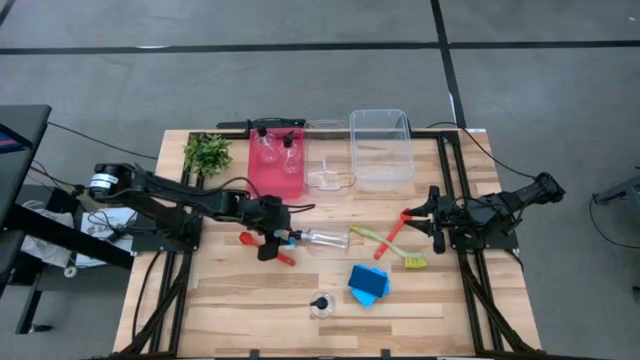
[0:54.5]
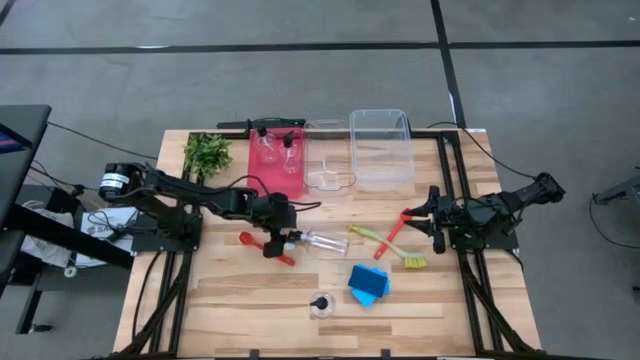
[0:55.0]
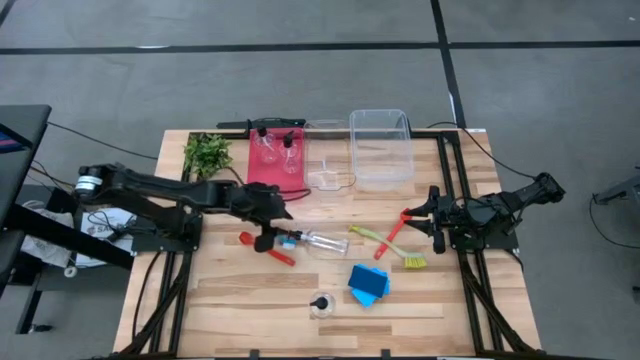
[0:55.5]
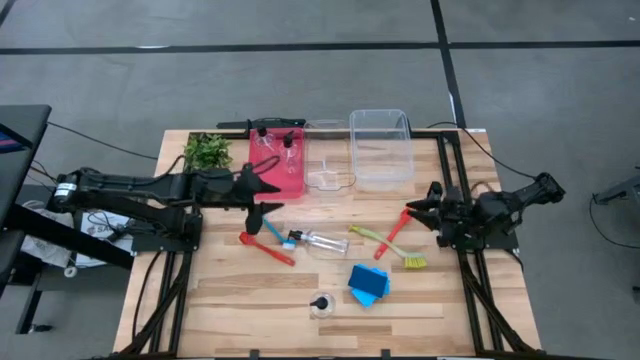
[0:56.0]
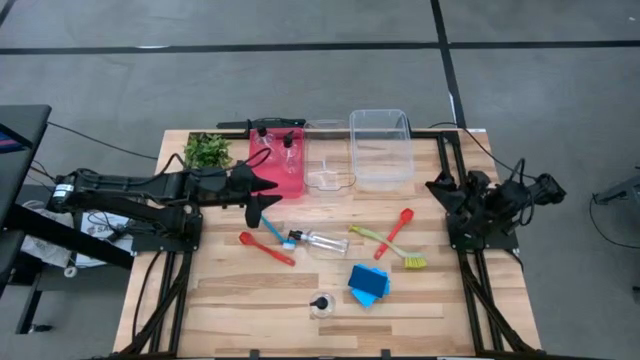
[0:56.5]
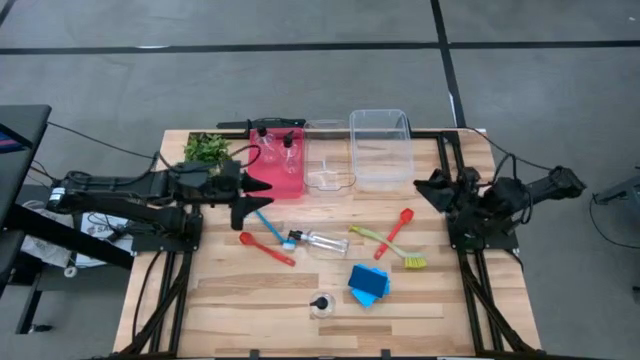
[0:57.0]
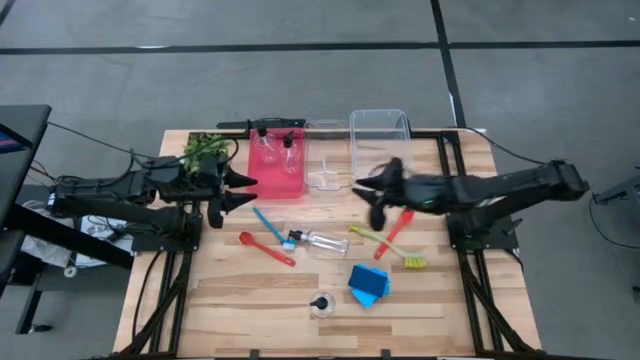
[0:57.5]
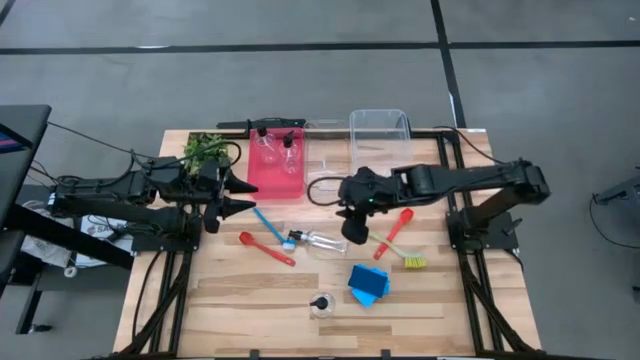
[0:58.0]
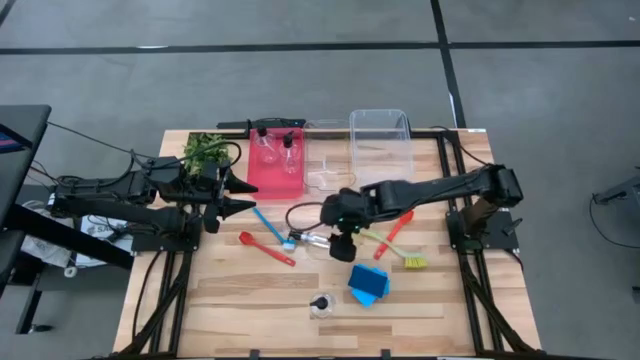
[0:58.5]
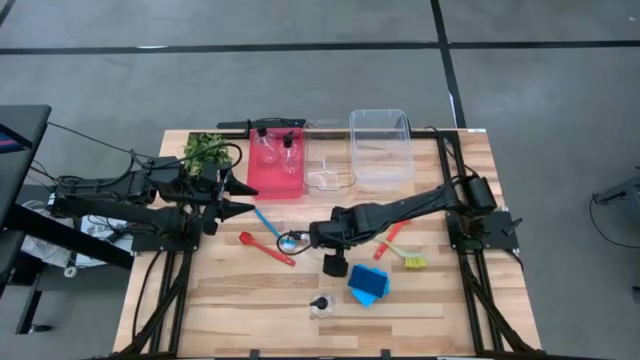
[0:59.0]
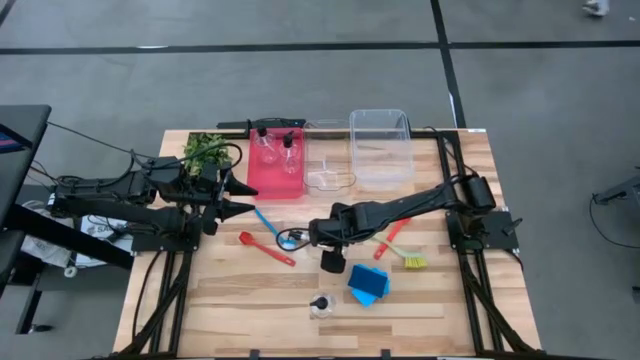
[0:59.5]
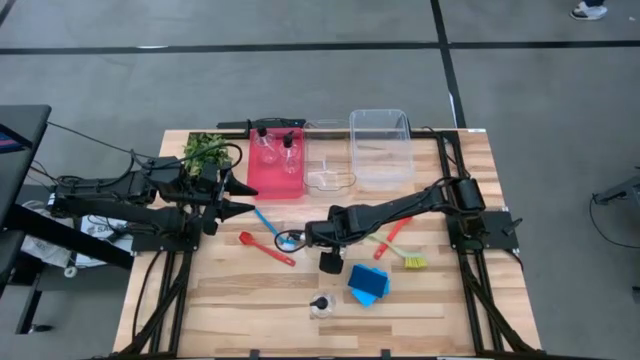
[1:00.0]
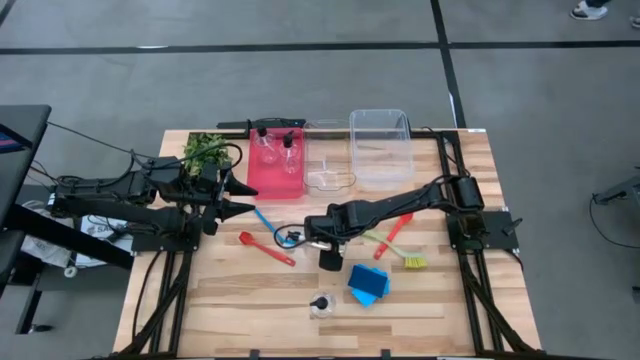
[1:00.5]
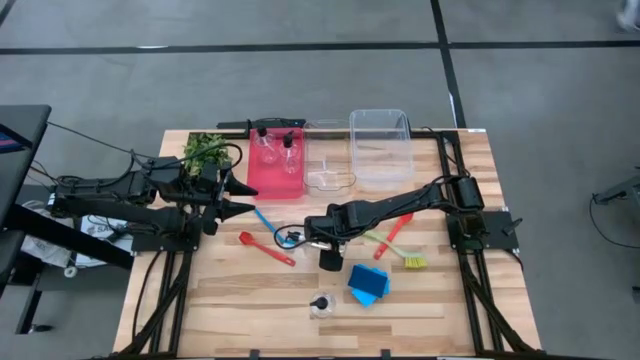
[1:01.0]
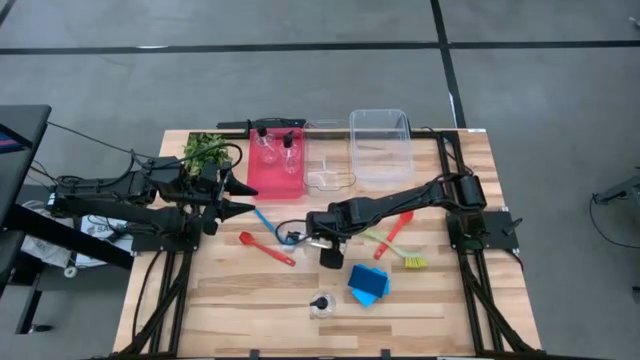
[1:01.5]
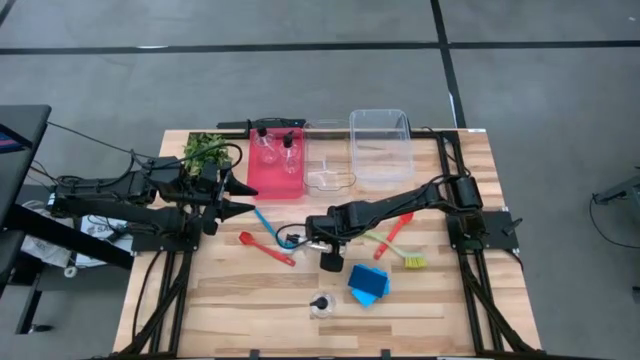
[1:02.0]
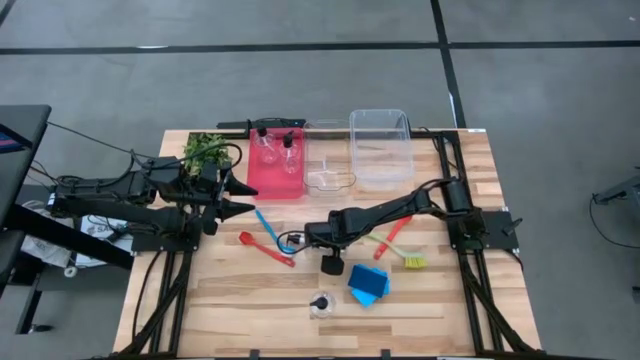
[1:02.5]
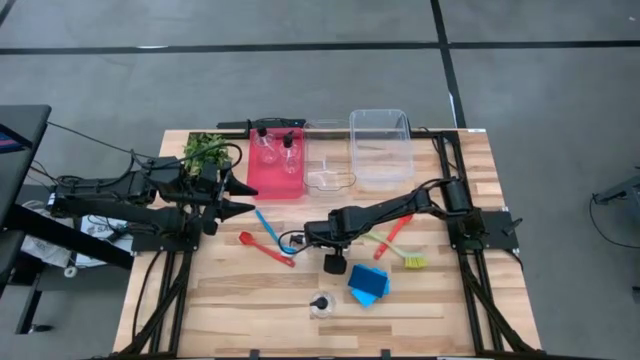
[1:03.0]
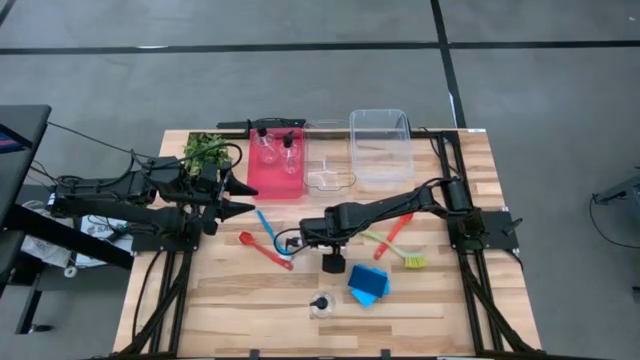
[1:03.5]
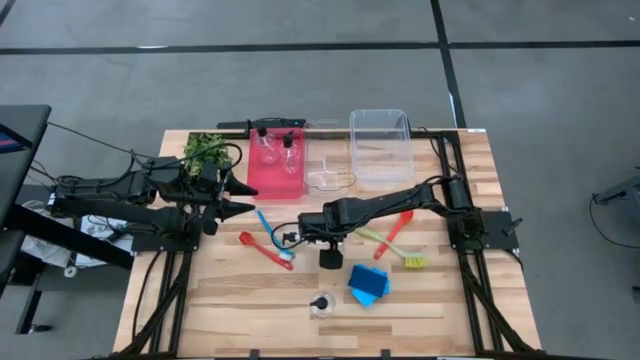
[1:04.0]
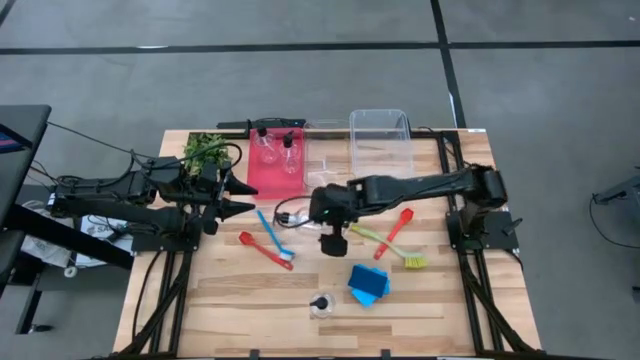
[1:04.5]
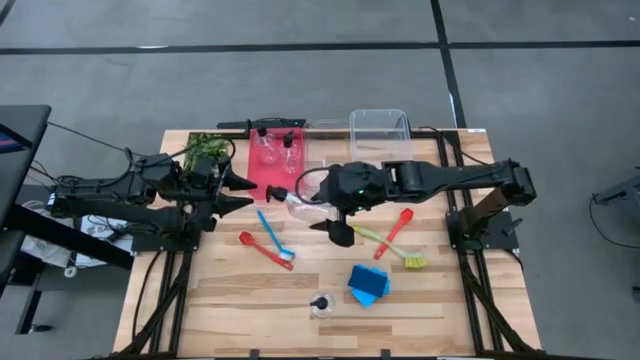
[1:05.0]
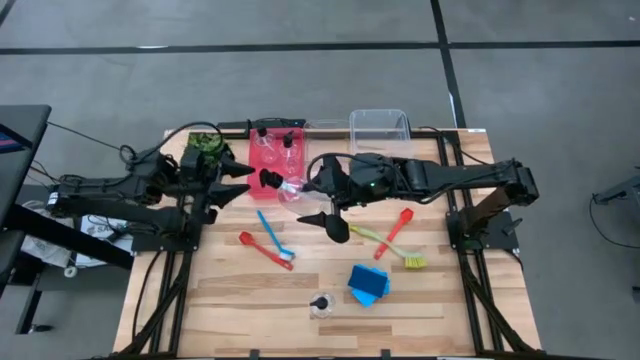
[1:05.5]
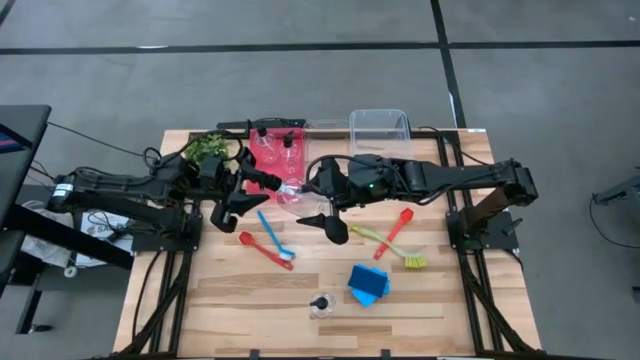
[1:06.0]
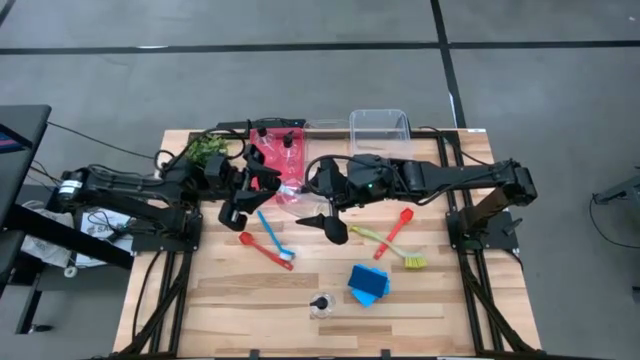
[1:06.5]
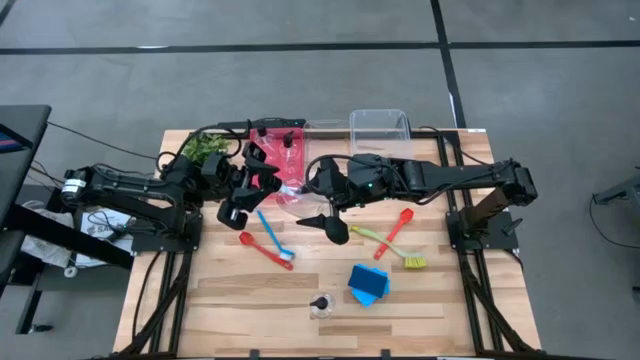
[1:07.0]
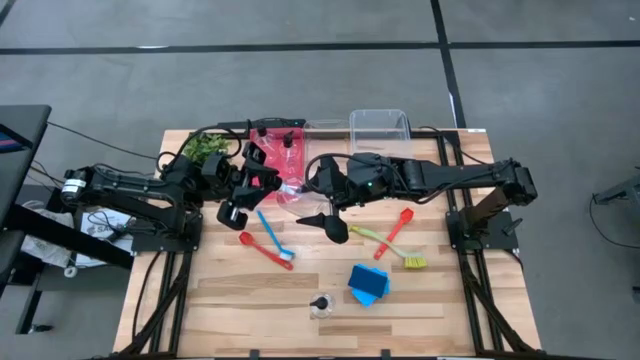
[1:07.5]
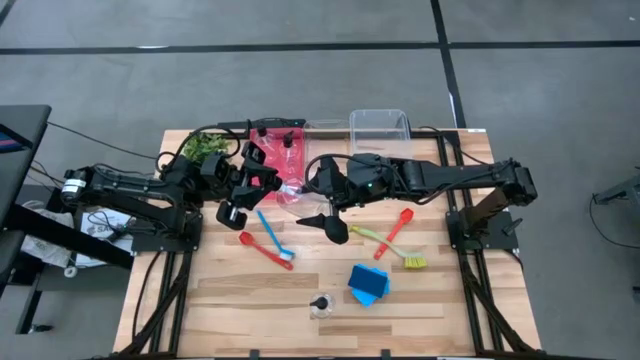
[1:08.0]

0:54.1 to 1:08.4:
Task: Pick & Place Kitchen Sink Supplies
Put the spray bottle into the pink bin

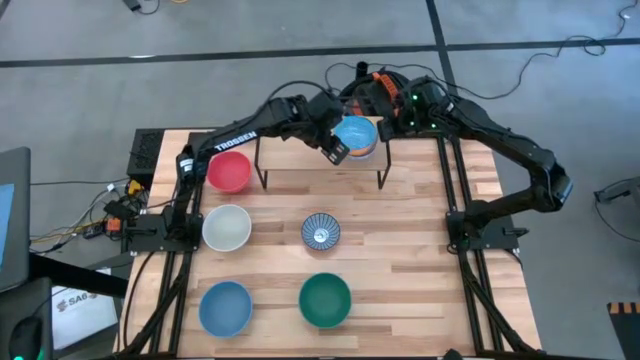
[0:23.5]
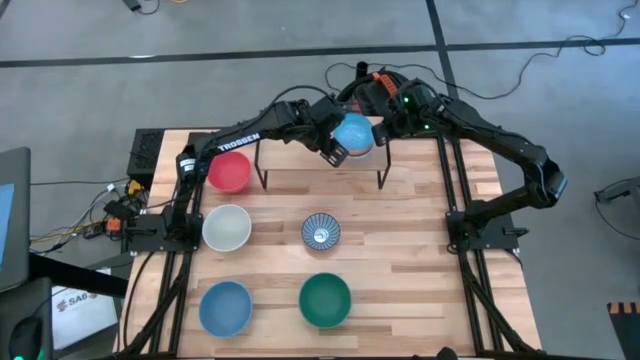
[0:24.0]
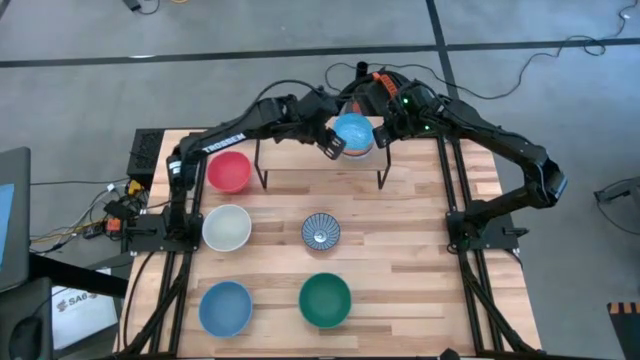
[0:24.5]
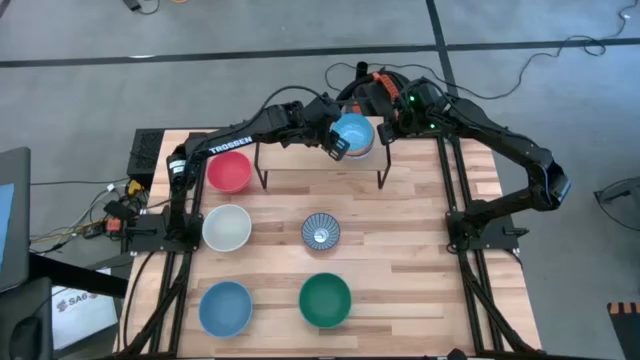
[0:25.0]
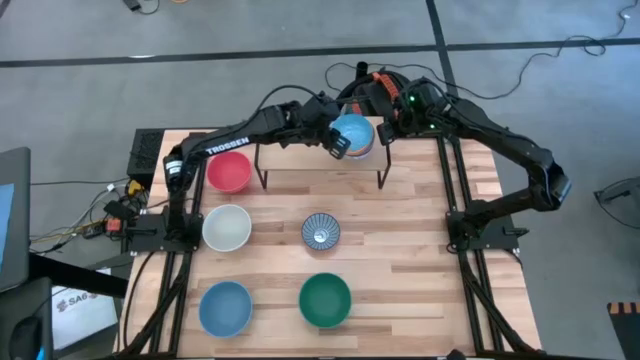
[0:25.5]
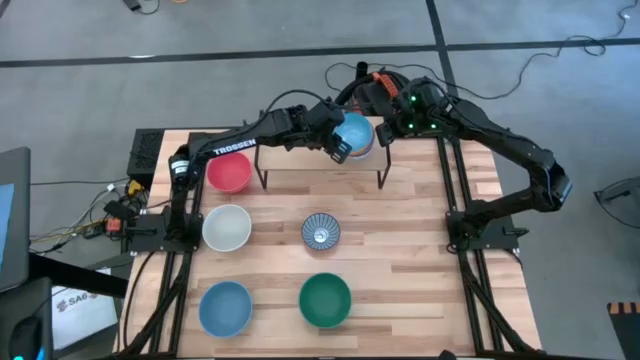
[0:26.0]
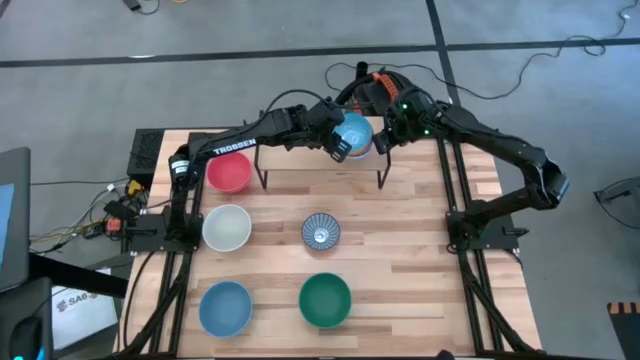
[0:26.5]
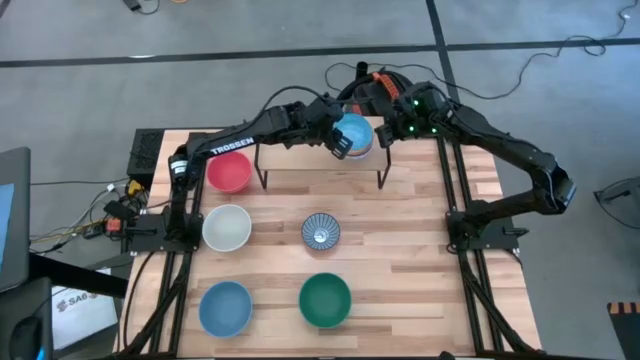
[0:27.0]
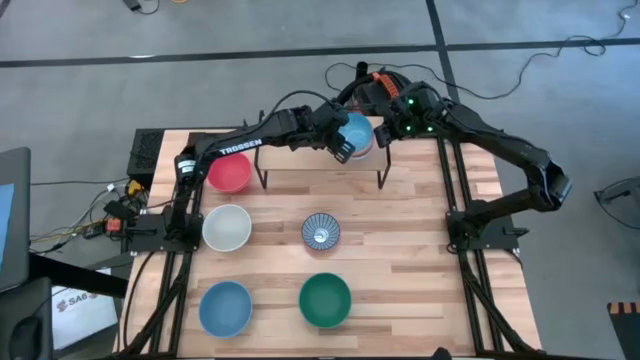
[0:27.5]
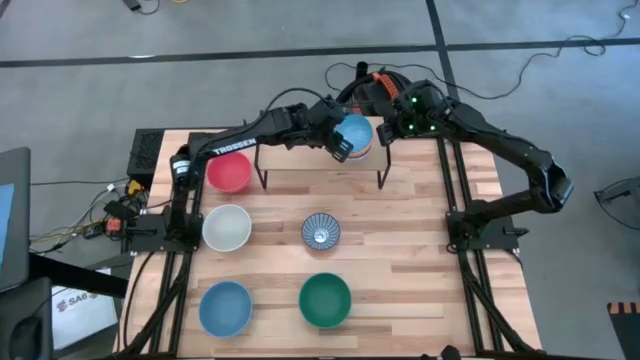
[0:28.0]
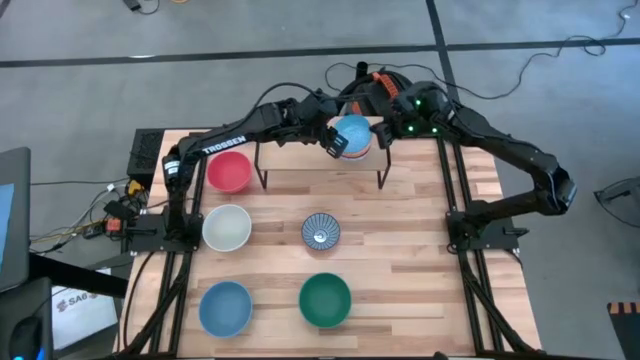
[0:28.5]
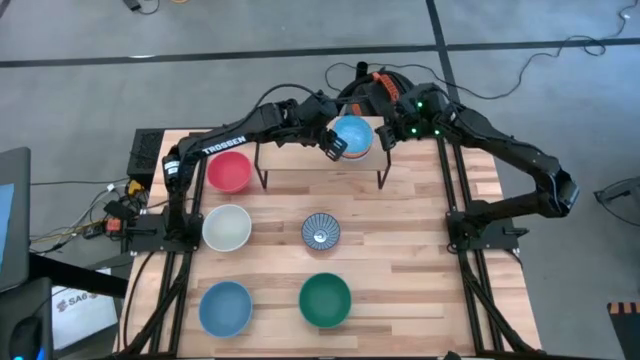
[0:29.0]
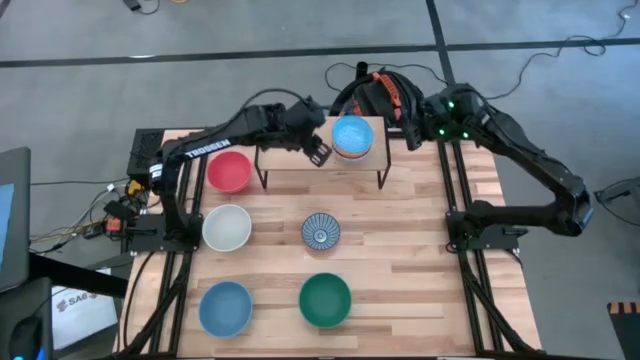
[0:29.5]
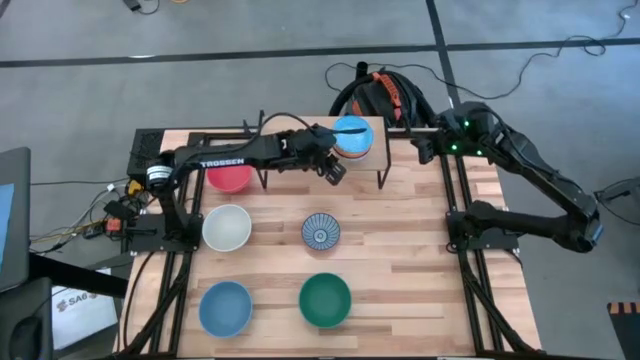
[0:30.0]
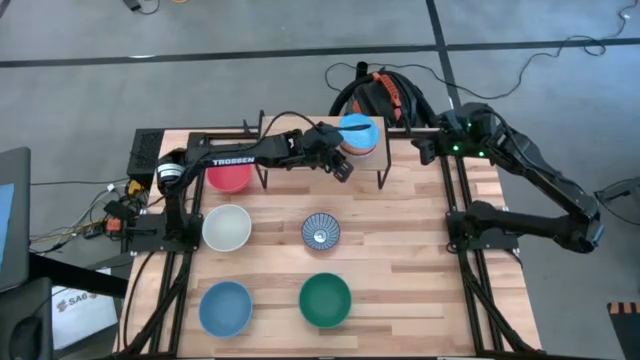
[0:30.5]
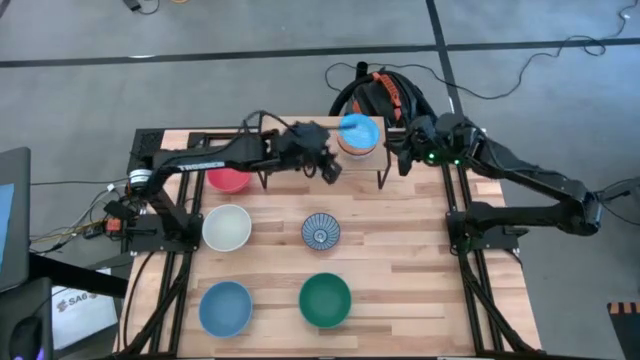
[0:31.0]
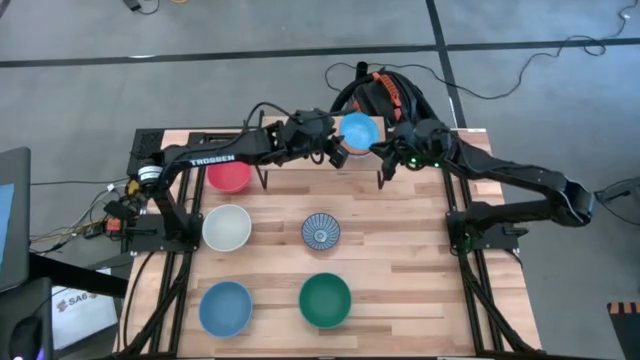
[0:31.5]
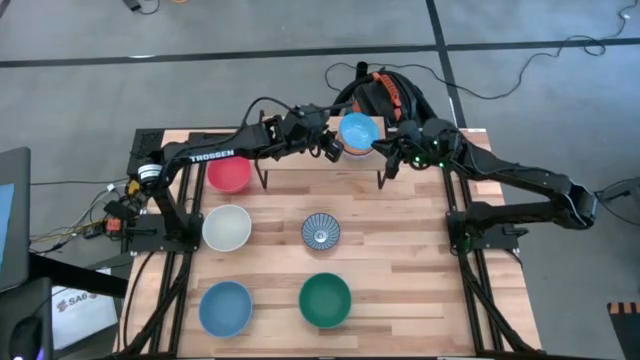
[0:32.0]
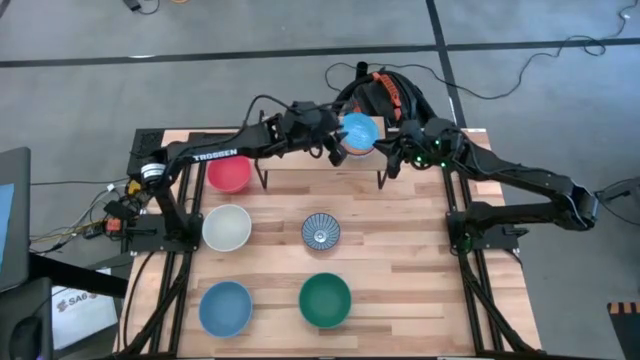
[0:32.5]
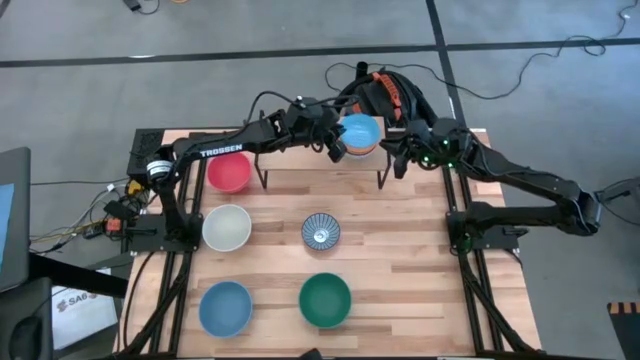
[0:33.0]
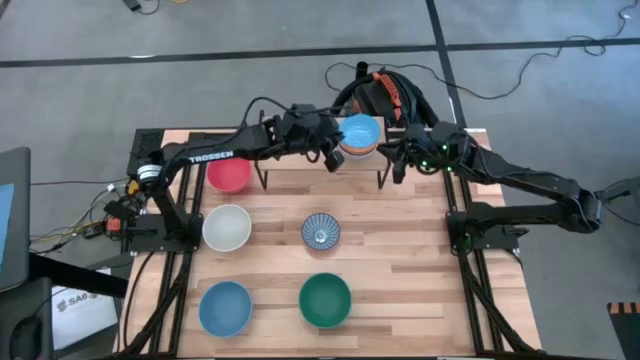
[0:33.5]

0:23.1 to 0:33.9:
Task: Place and stack bowls onto a shelf
Adjust the stacked bowls on the shelf
